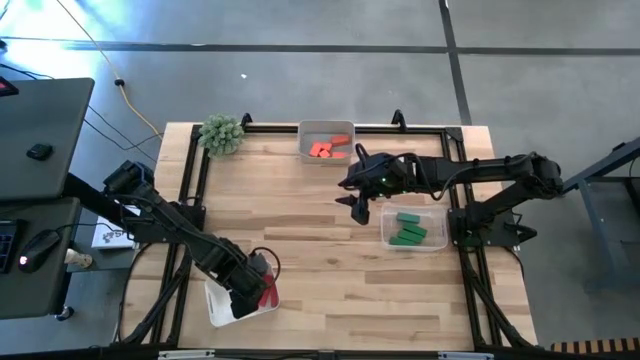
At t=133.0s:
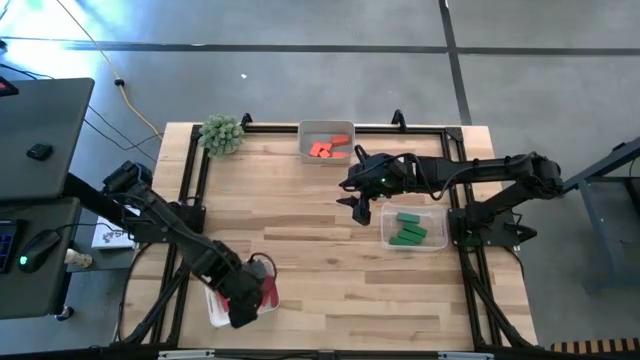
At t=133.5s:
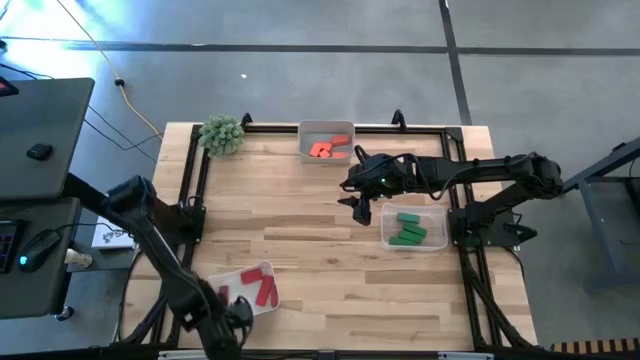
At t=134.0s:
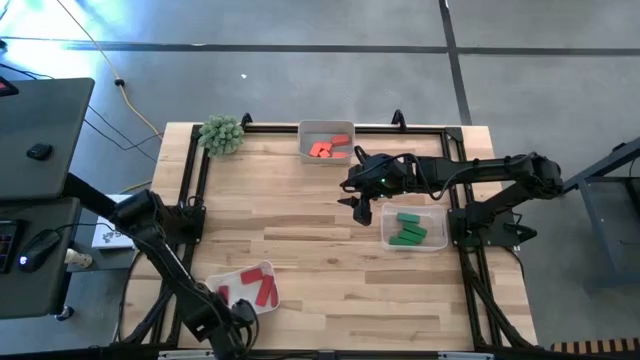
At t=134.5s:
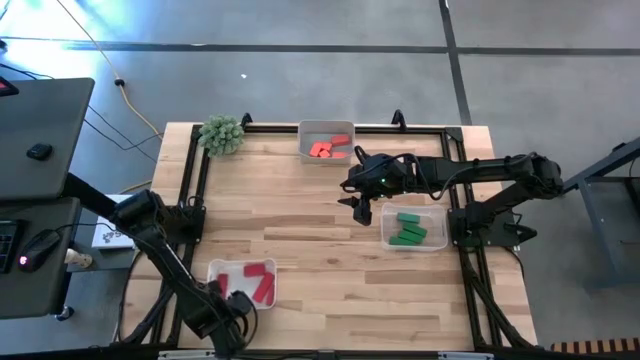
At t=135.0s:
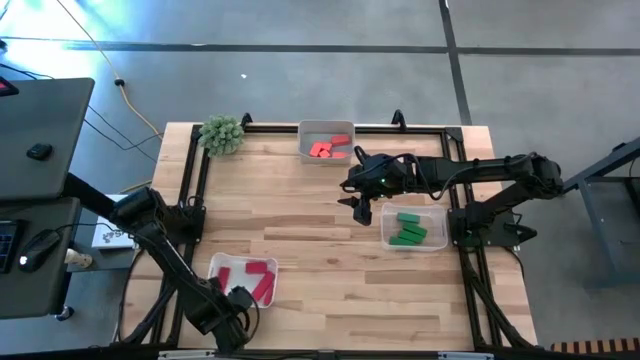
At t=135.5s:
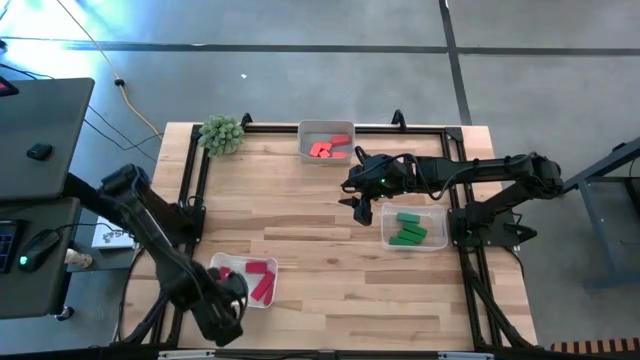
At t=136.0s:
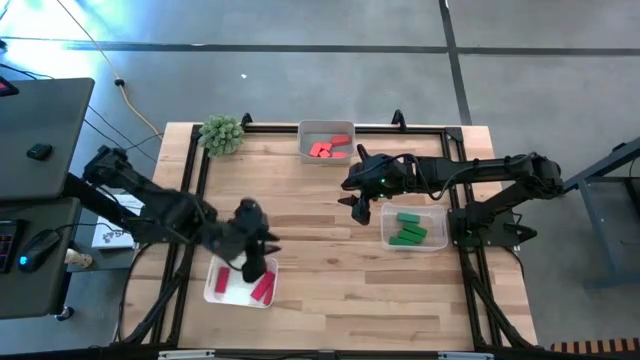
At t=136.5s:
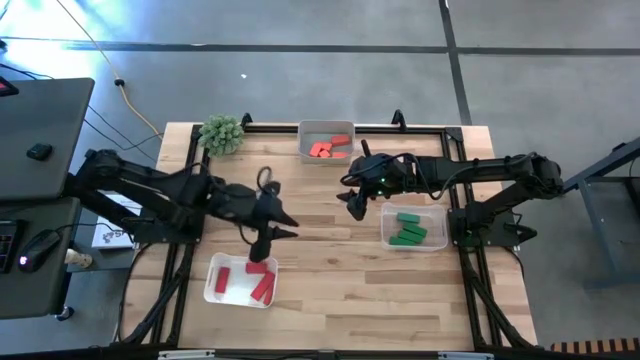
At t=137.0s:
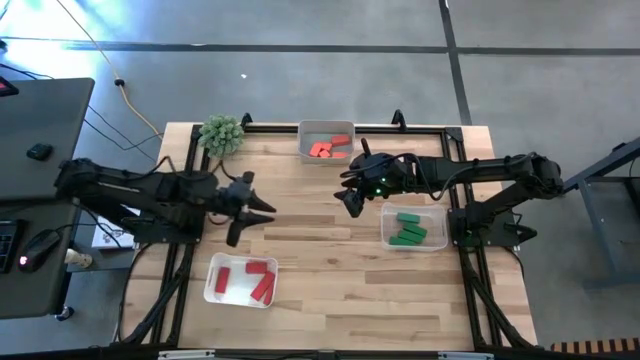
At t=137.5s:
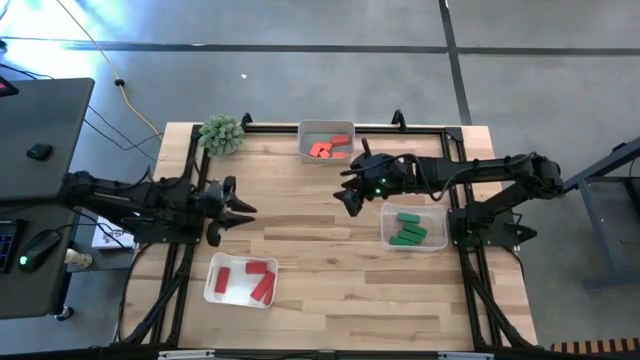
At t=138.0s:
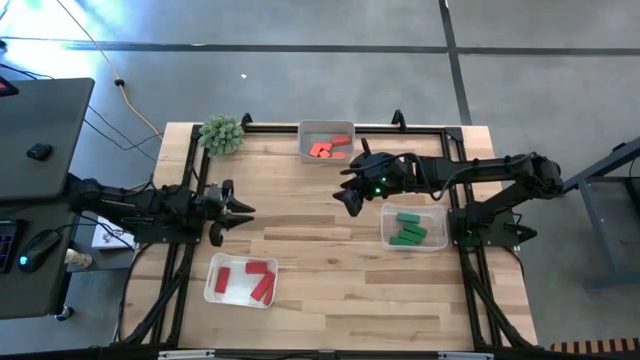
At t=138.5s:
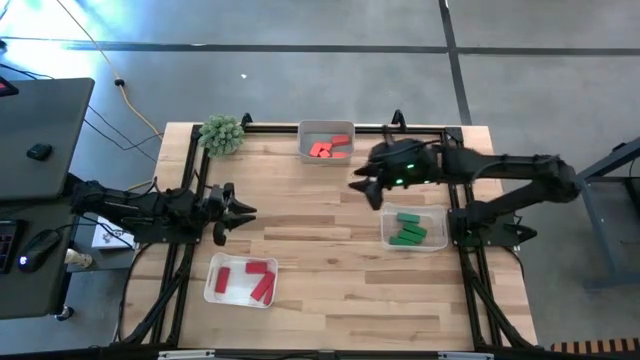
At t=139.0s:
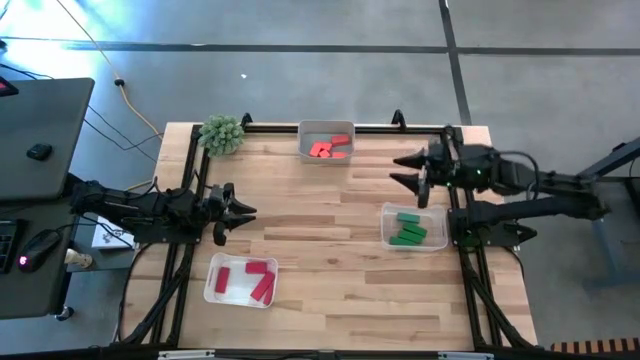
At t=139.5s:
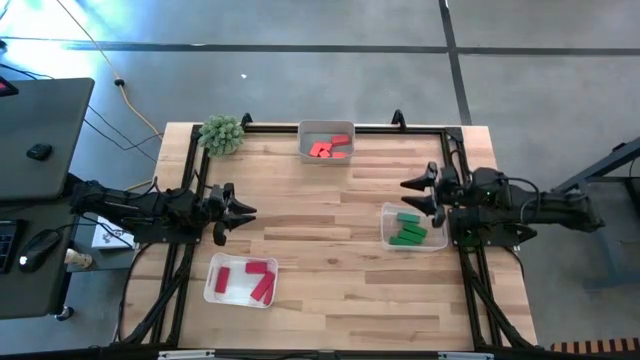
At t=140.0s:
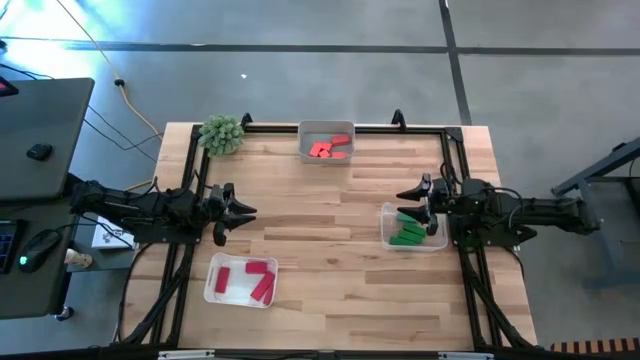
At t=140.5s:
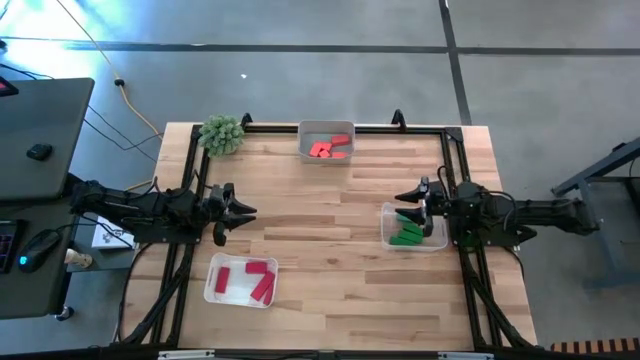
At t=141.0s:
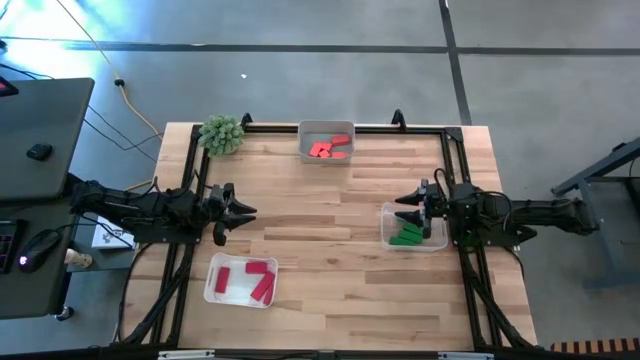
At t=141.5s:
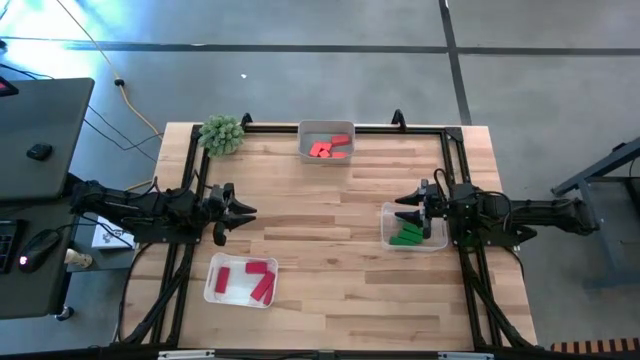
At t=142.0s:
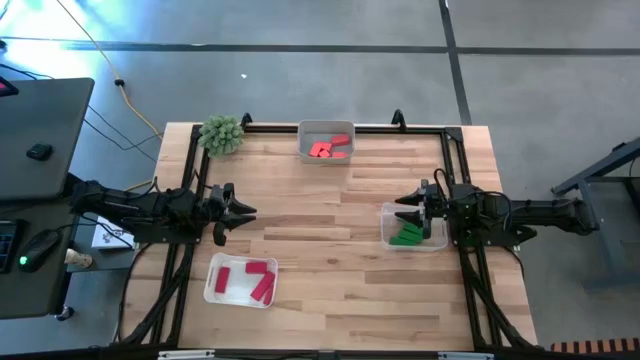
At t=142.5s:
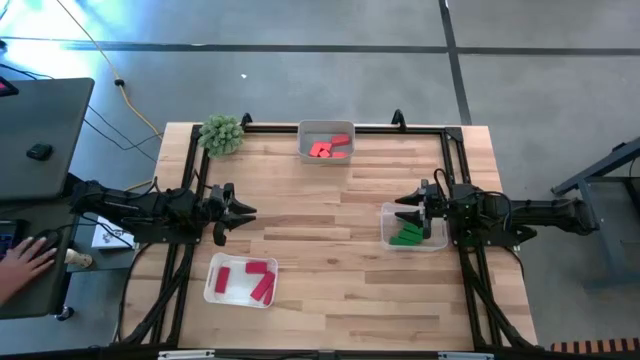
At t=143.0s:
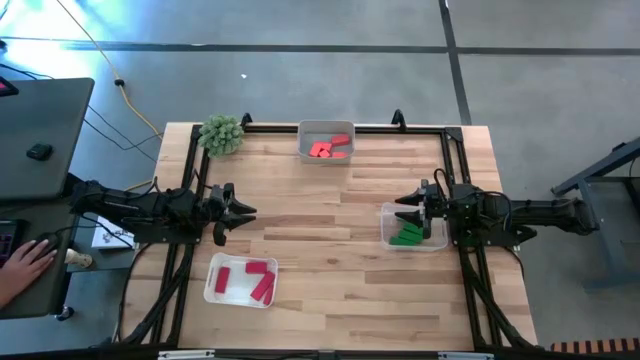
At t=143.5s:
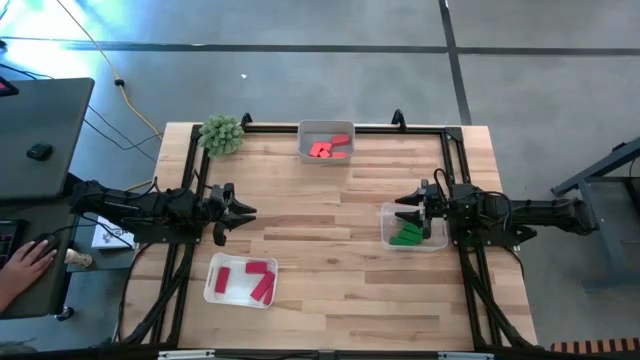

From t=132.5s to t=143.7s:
Task: Sort & place blocks by color
Return to Home Position

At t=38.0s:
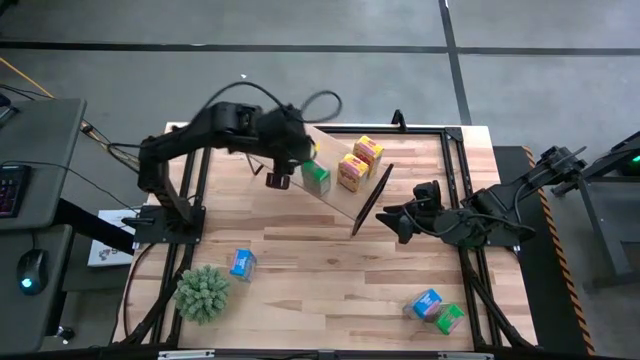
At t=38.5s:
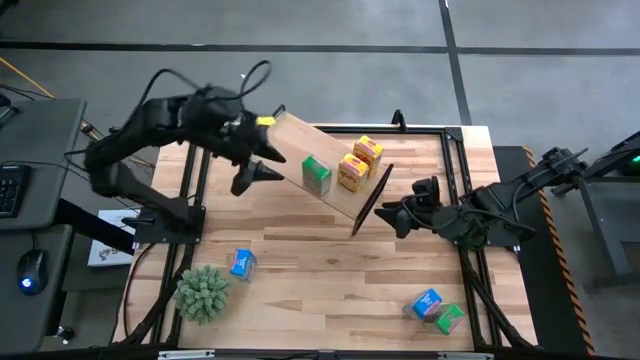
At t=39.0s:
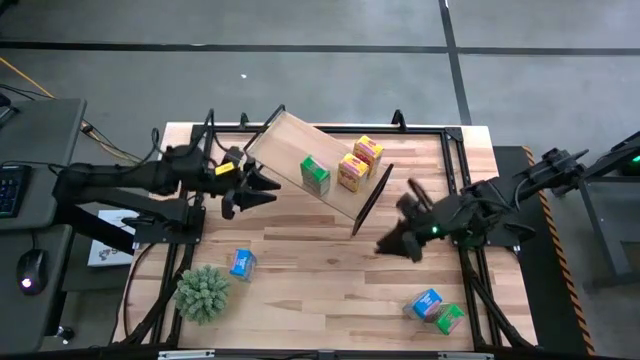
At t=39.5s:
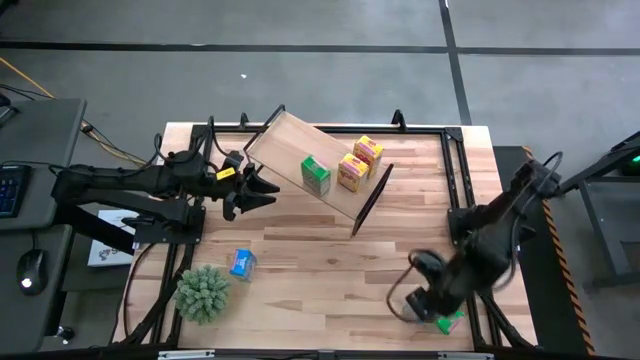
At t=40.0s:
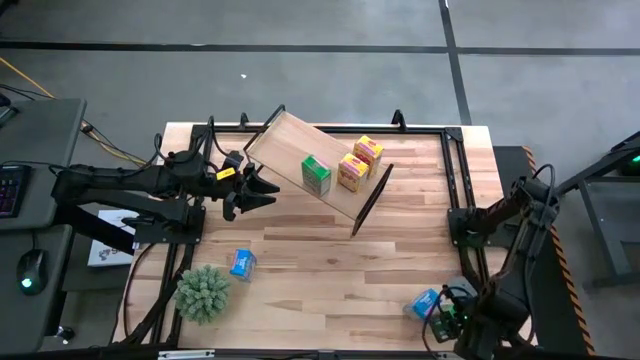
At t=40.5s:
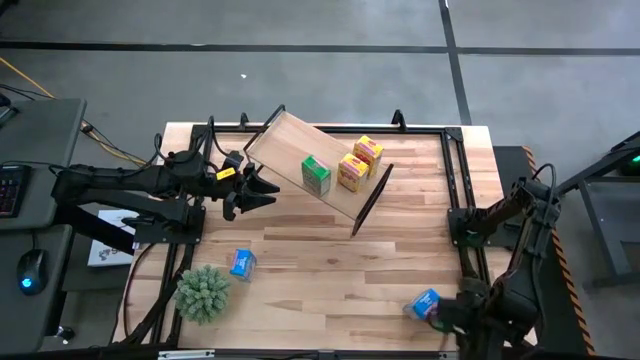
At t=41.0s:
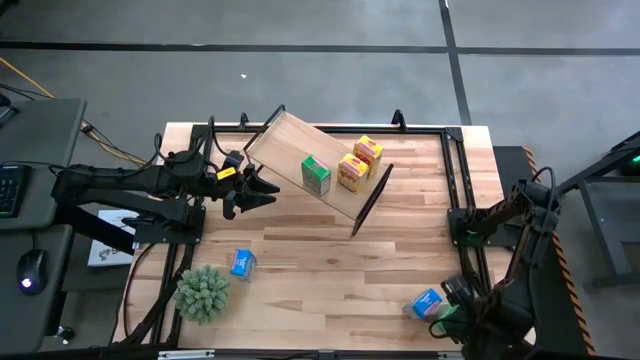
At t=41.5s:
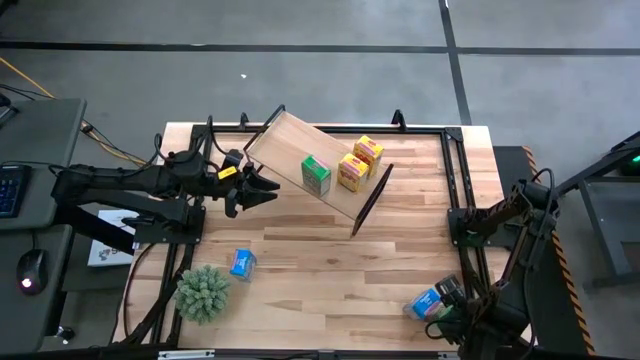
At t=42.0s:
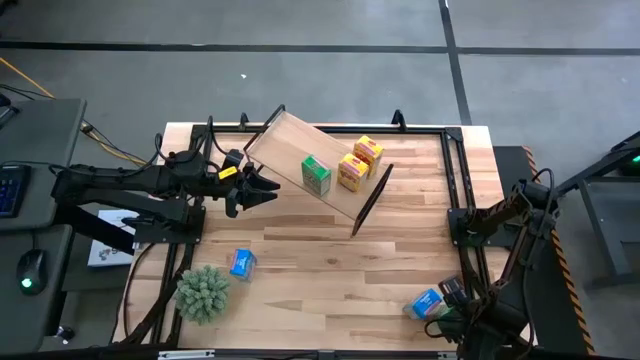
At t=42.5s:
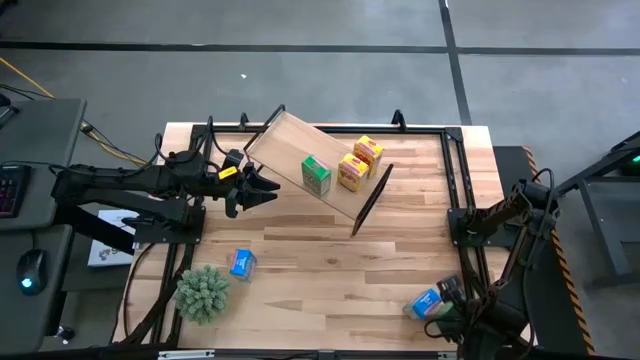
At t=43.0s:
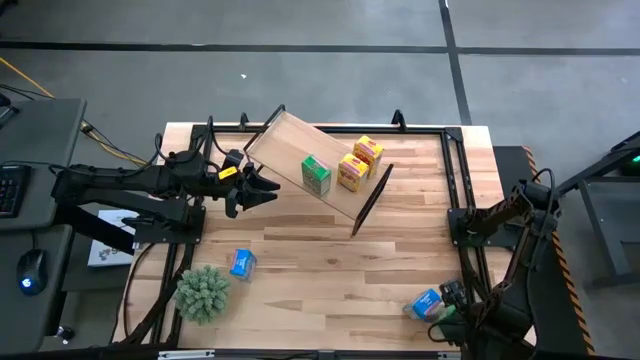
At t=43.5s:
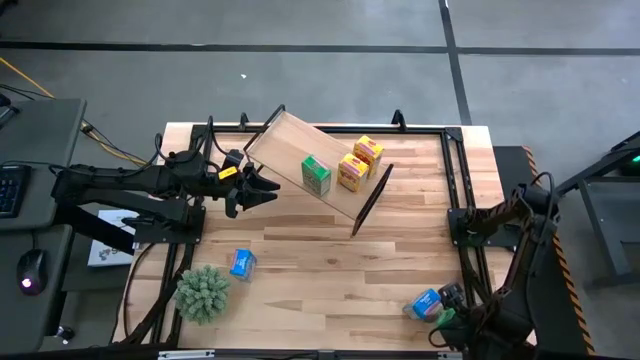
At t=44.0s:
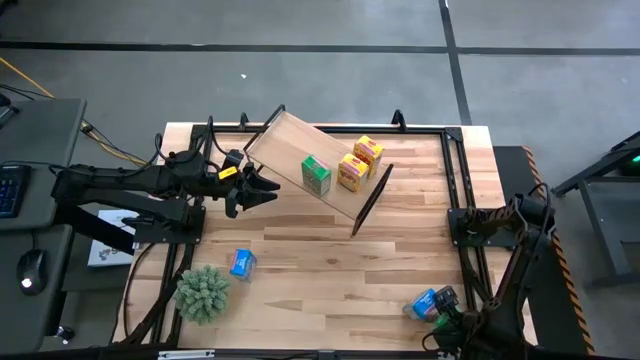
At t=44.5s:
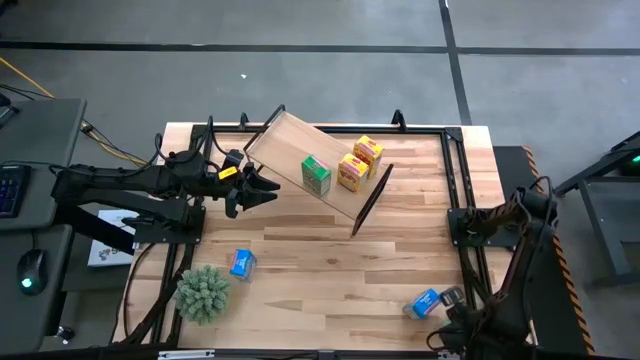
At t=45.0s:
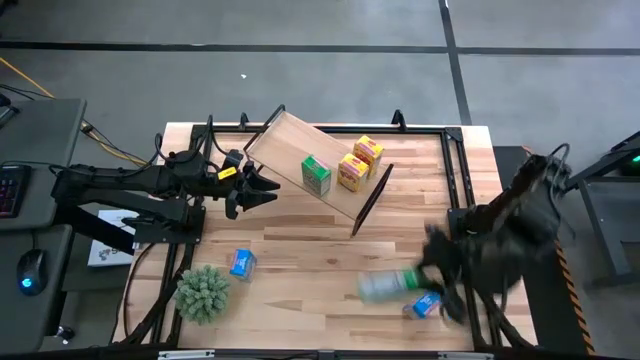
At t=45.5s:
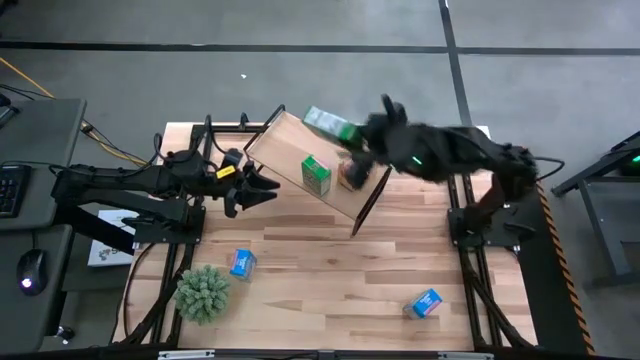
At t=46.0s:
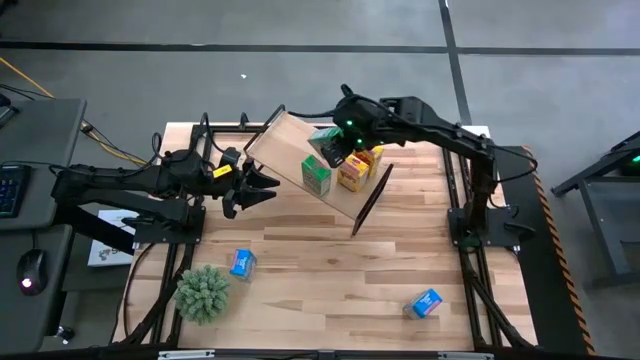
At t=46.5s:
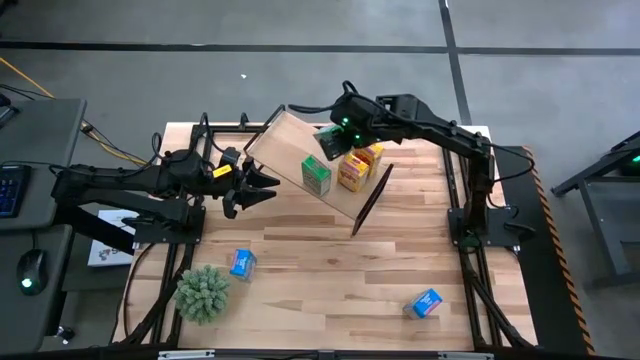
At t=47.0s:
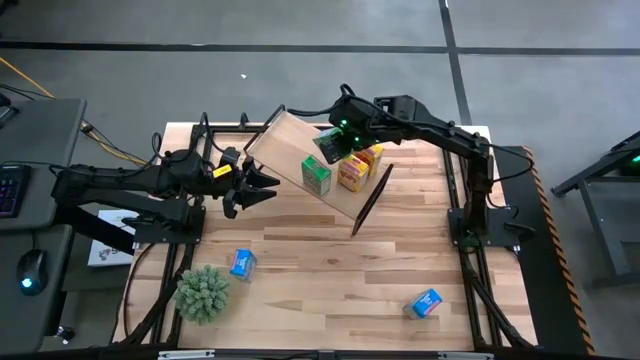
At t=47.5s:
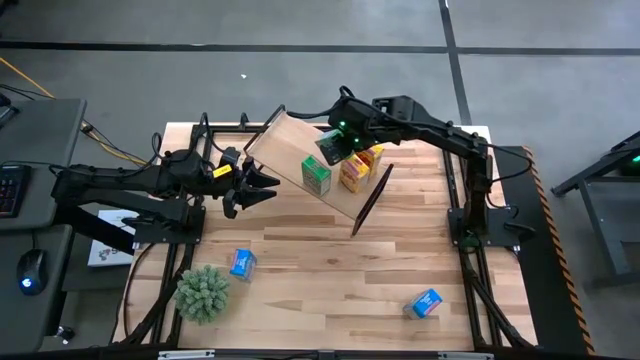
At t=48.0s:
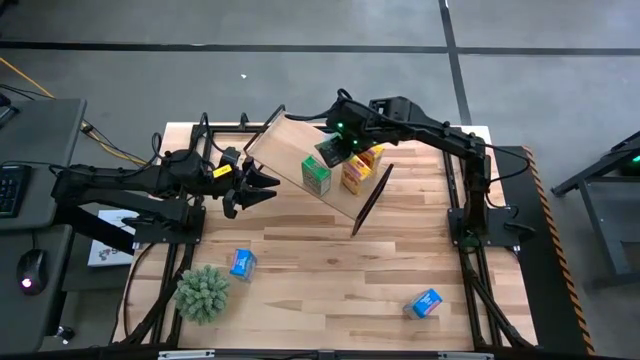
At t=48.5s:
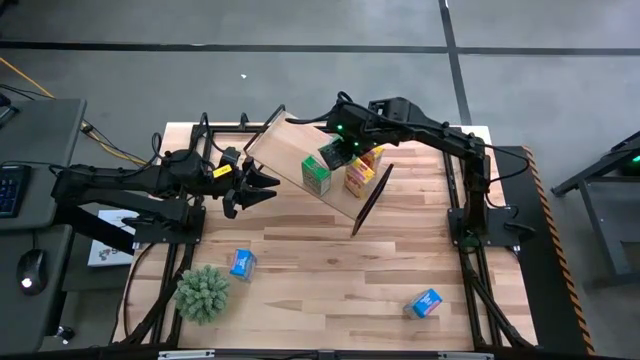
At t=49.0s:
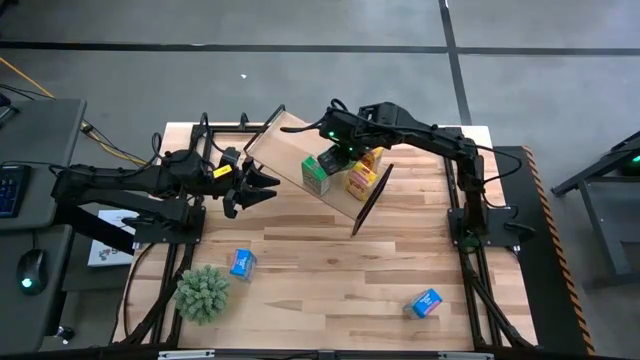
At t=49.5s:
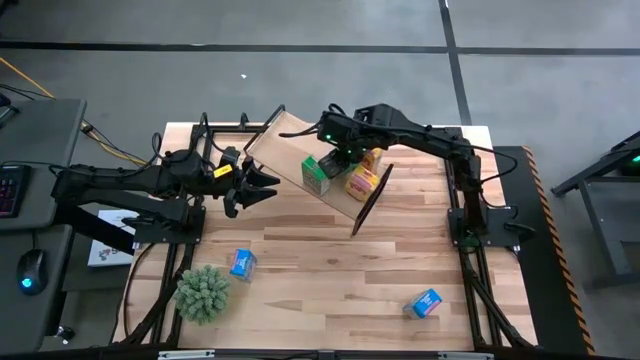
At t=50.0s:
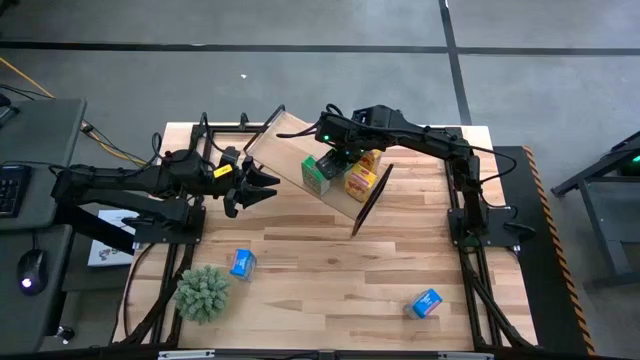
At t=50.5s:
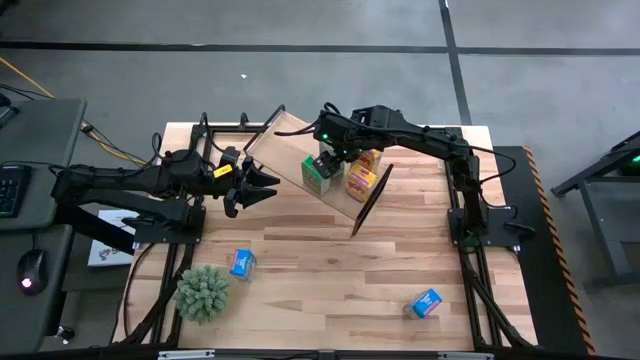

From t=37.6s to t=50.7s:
Task: Stack cereal on shelf
Put the green cereal box on the shelf aligned with the other yellow cereal box
